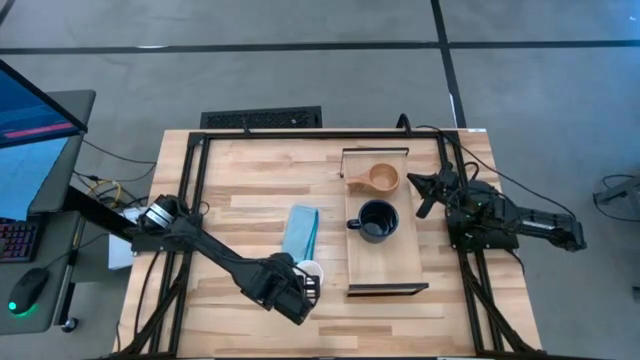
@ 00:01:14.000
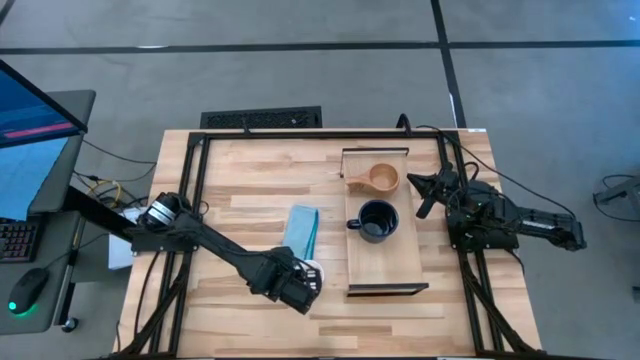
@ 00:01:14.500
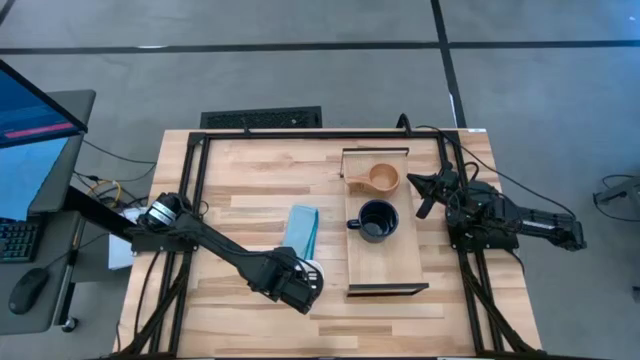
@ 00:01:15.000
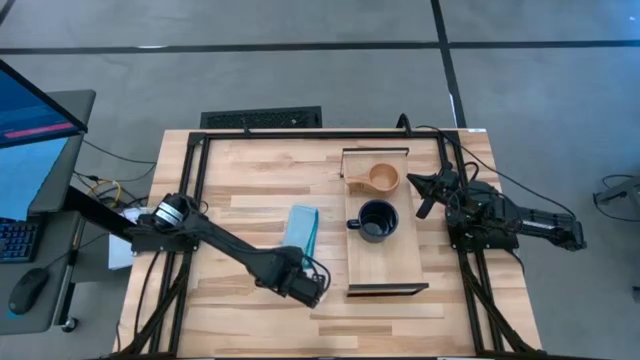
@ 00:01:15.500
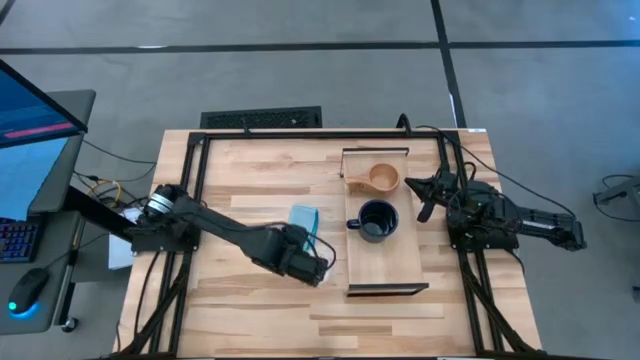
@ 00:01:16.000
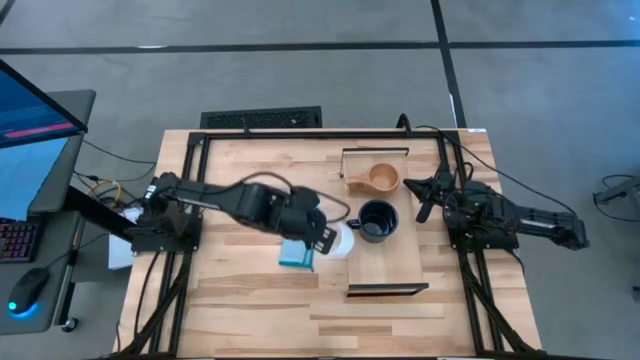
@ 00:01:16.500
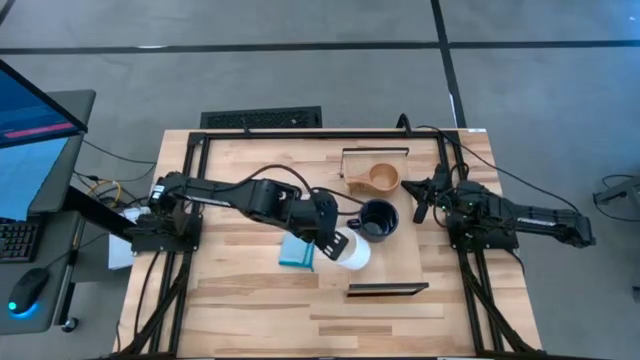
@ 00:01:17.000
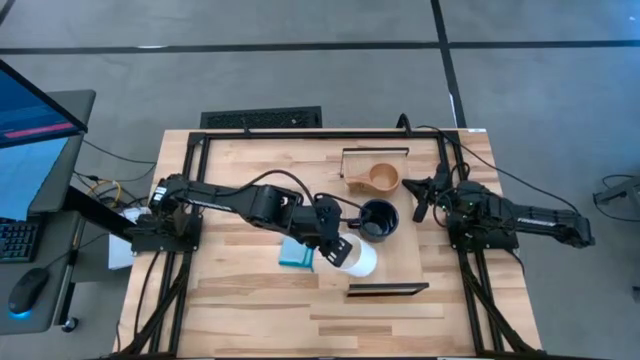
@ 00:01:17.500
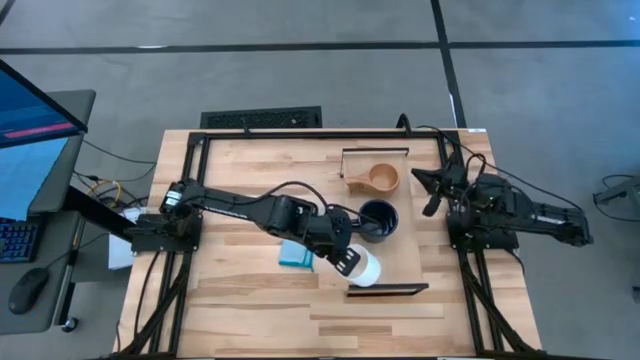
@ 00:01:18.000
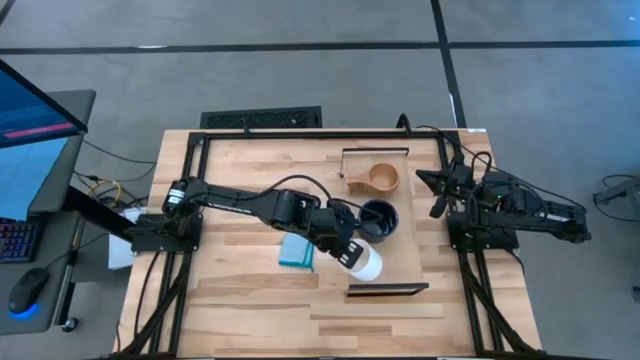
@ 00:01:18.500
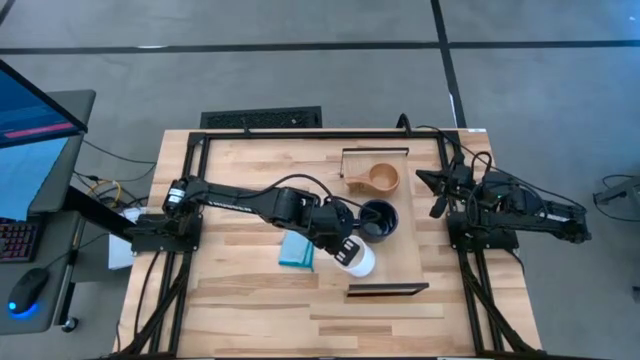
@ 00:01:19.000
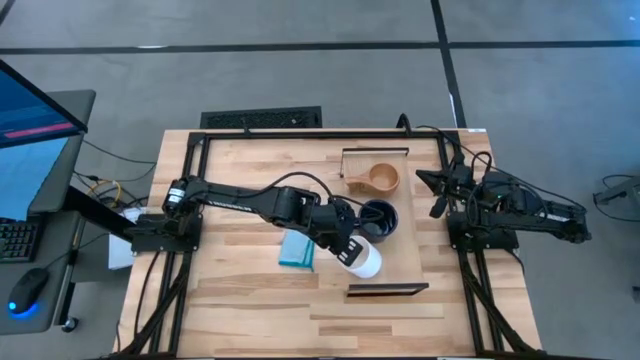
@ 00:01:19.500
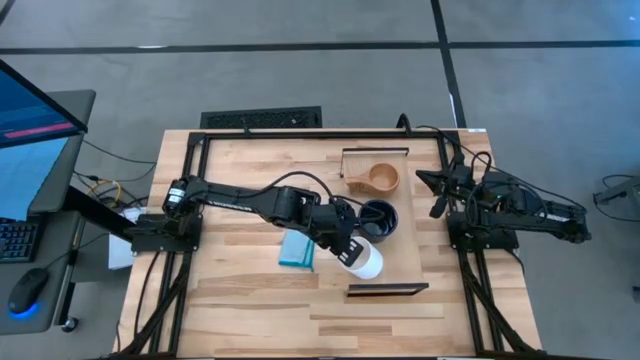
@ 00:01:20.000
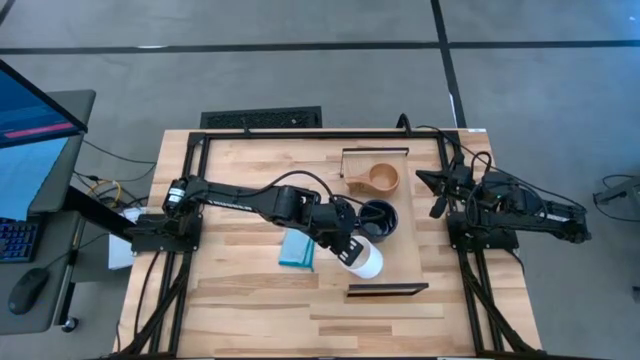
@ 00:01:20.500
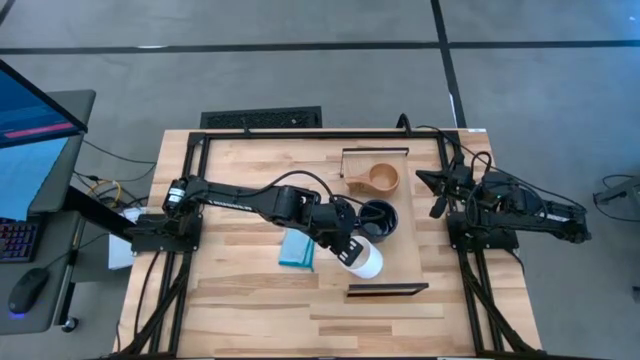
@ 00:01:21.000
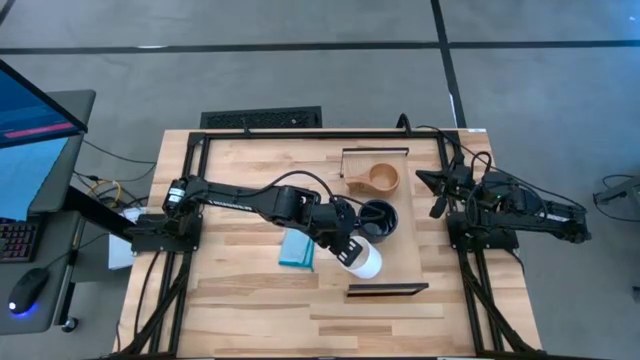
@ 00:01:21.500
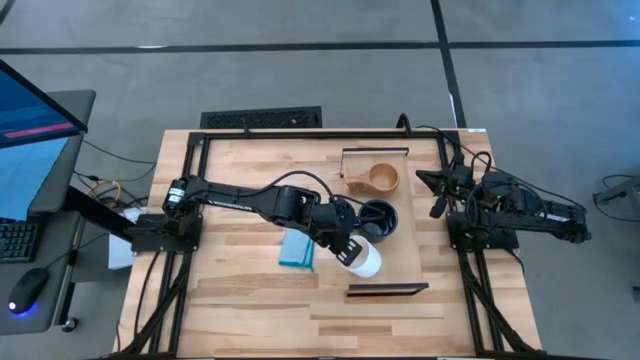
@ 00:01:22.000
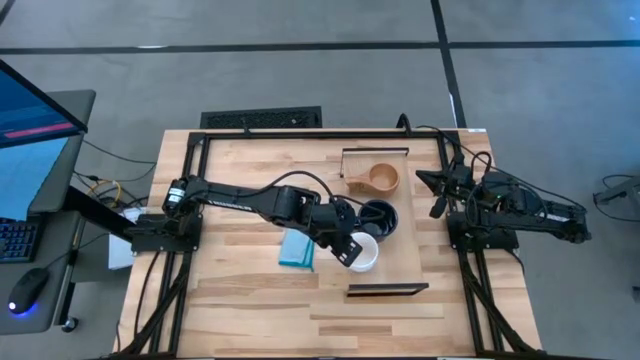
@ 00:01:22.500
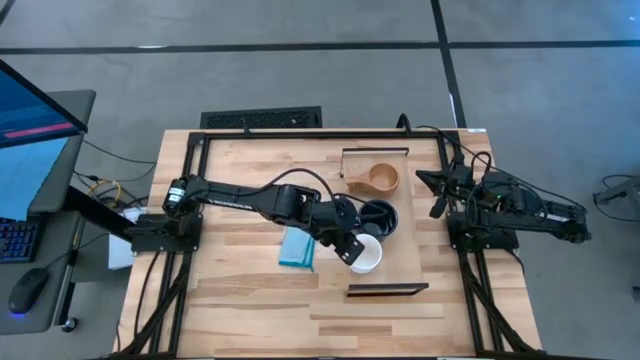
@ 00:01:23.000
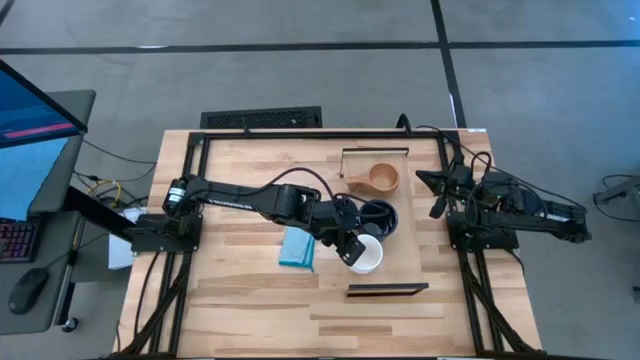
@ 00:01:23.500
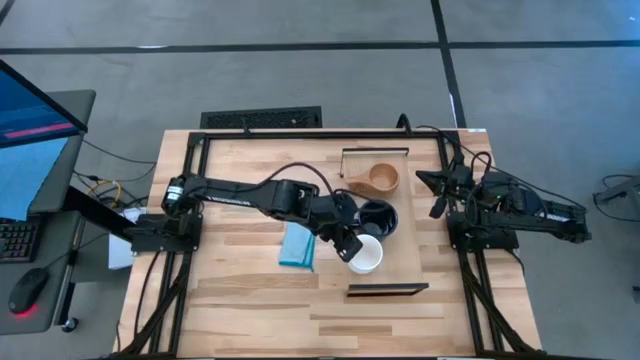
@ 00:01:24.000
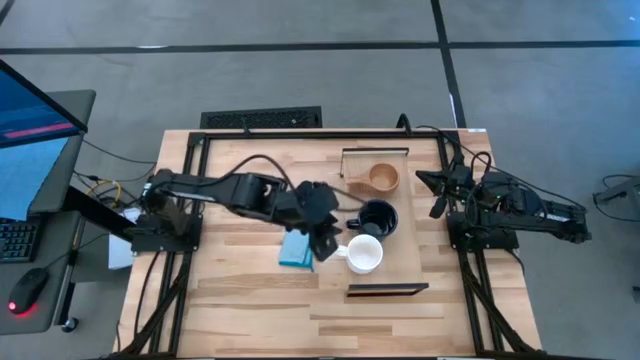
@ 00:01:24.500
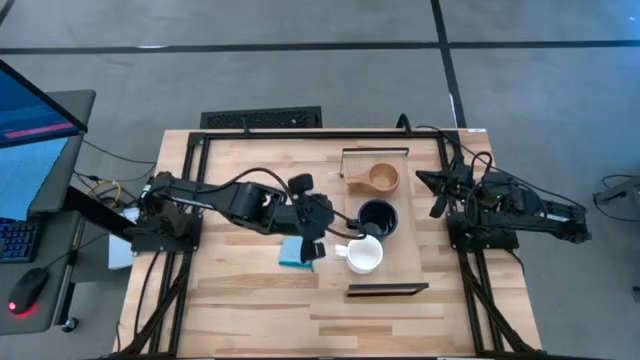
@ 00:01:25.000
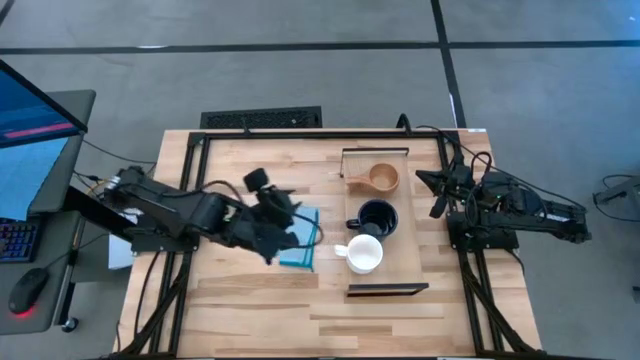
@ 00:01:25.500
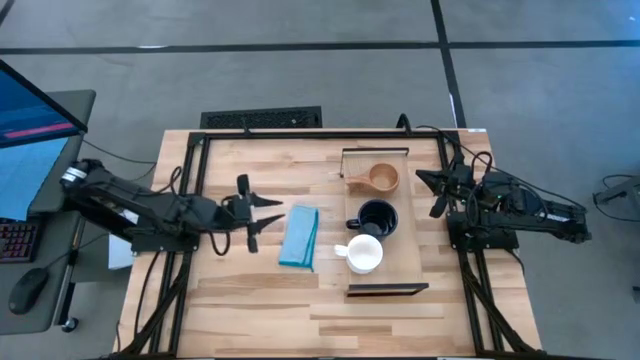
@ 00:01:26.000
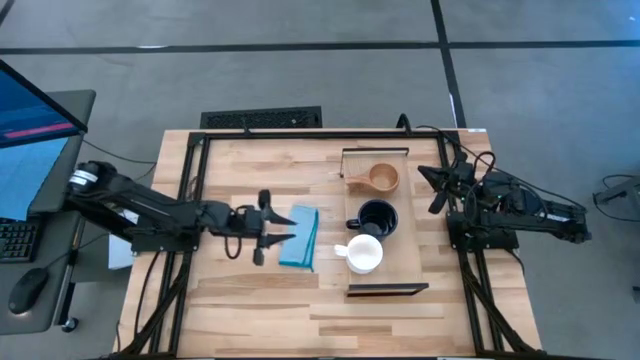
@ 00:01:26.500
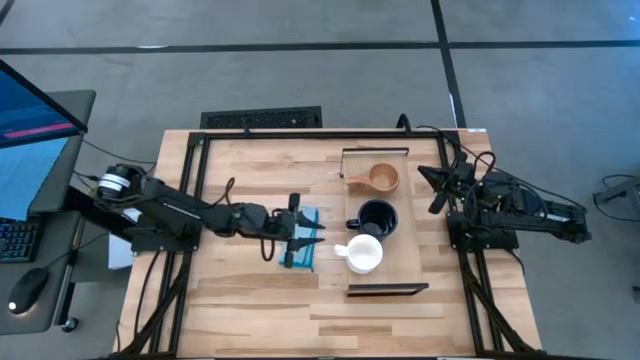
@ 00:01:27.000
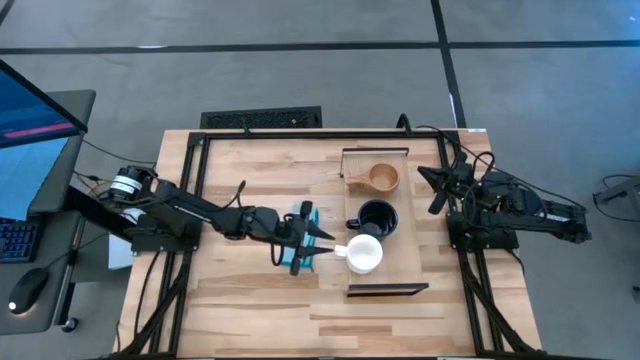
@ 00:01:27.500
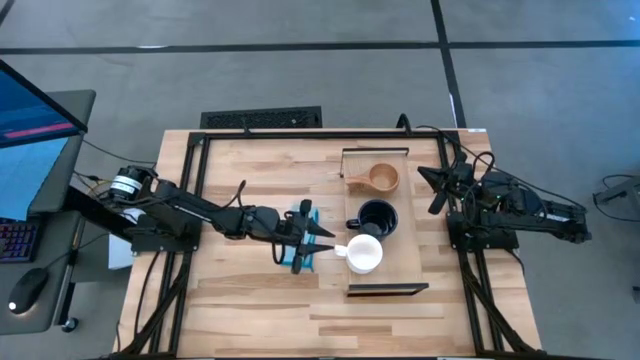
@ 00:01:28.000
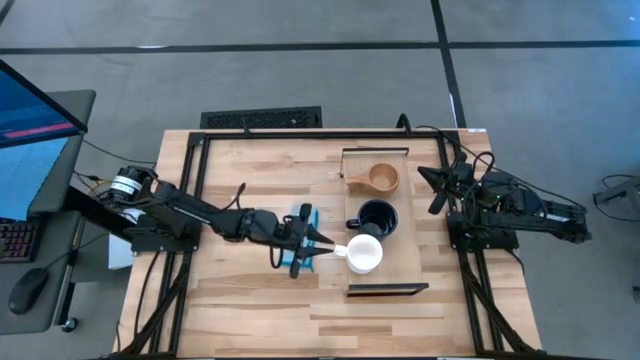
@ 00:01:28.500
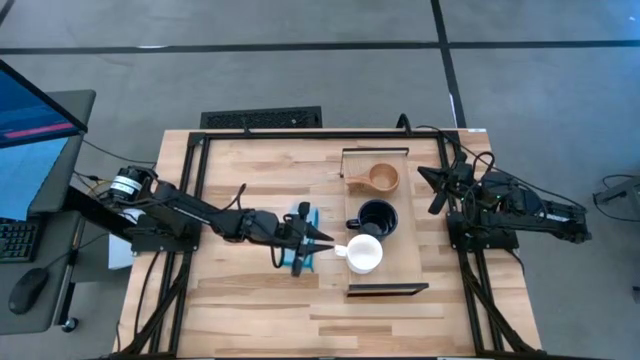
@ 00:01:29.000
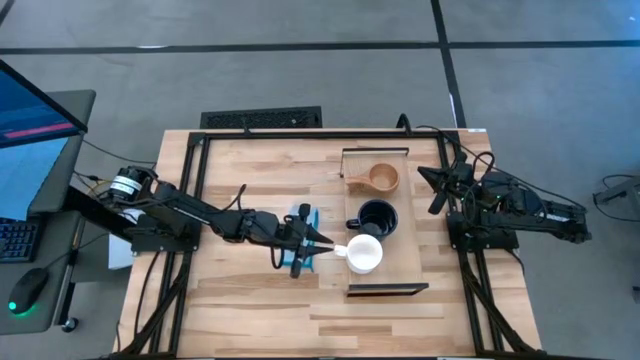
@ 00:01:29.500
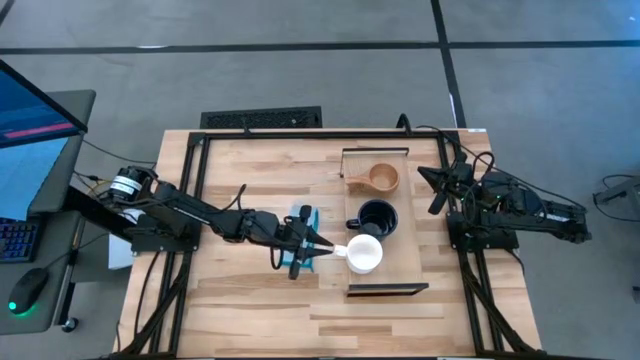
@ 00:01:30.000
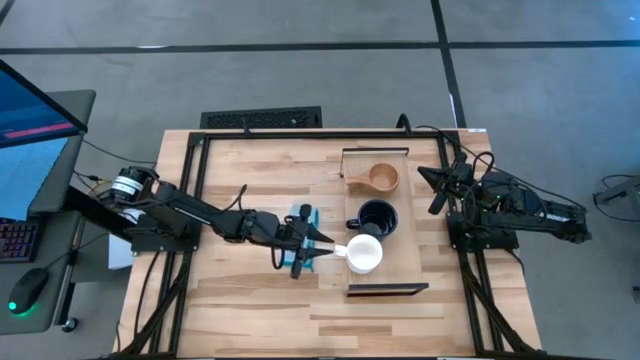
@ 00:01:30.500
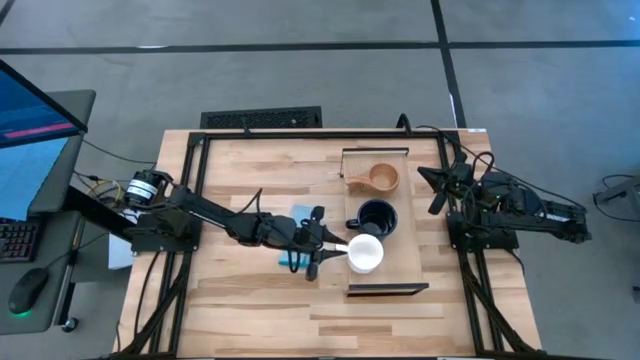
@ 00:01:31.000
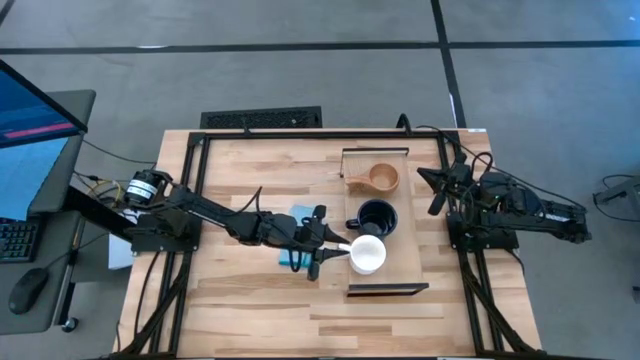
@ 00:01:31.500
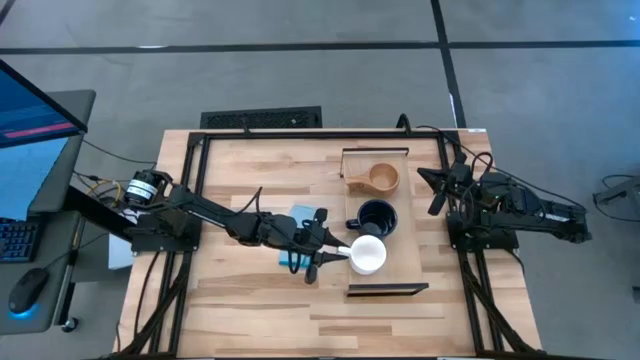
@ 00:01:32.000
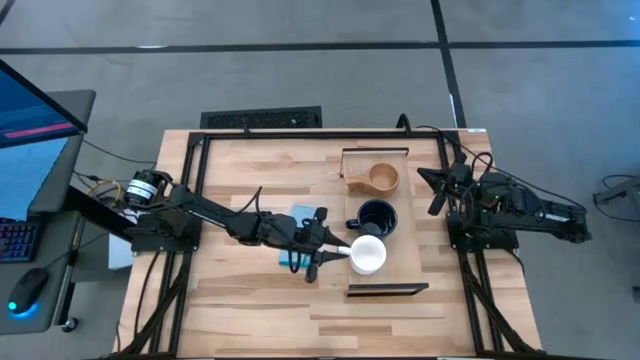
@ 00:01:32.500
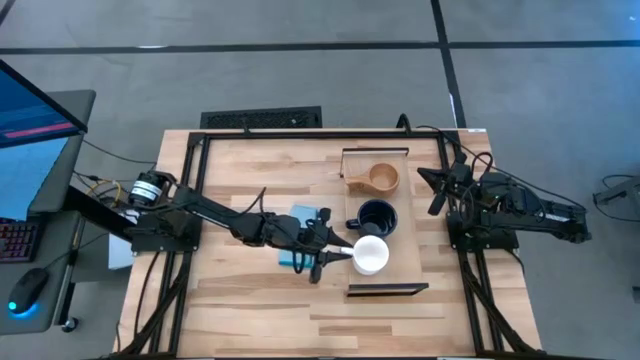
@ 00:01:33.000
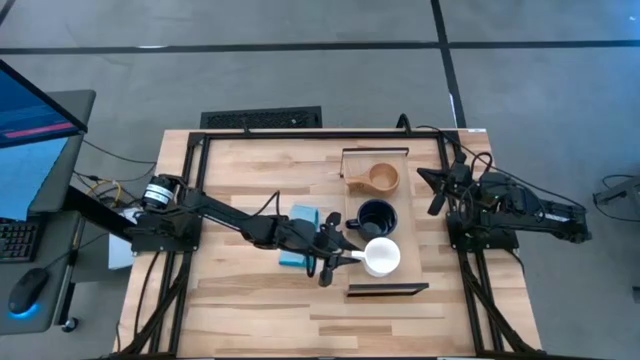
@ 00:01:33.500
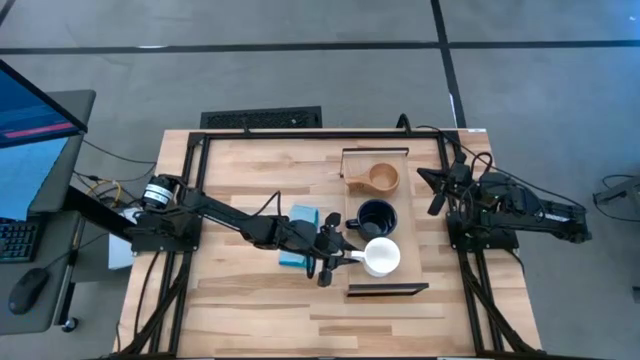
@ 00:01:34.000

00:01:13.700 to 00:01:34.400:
Task: Stack small to large cups/mugs on shelf
Put the white mug on the shelf
